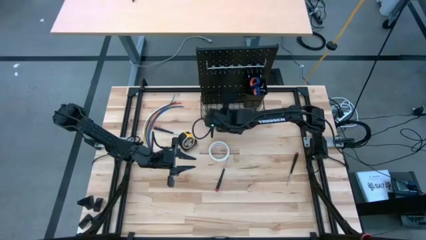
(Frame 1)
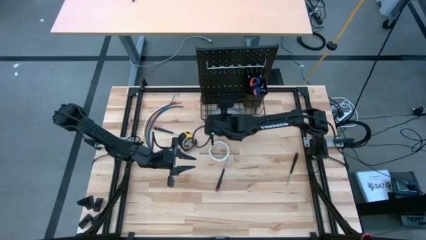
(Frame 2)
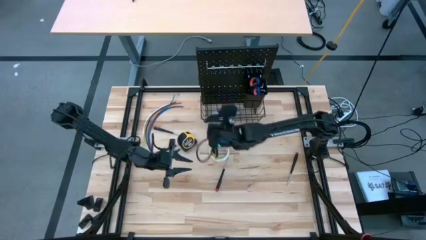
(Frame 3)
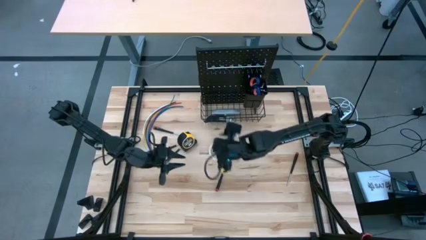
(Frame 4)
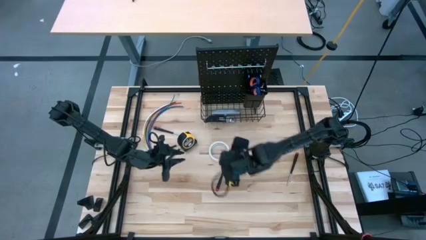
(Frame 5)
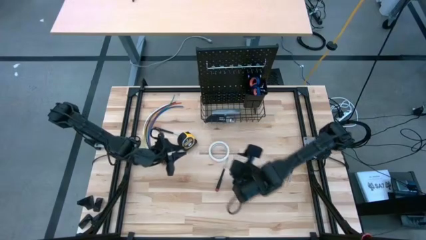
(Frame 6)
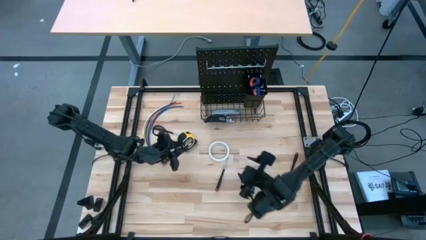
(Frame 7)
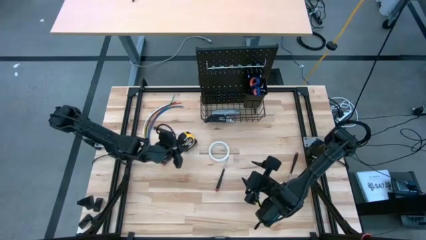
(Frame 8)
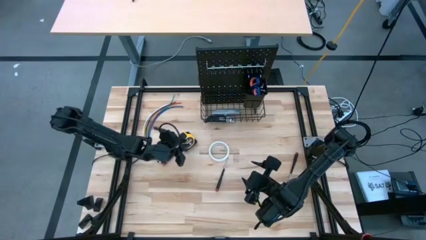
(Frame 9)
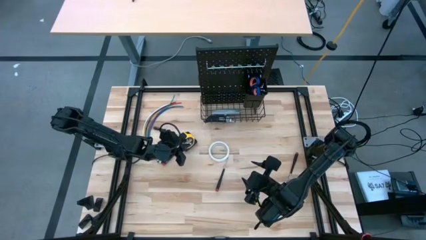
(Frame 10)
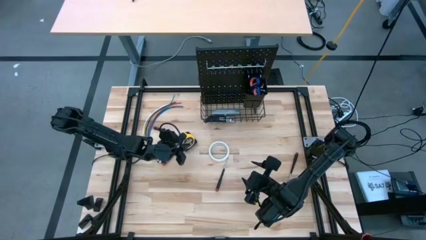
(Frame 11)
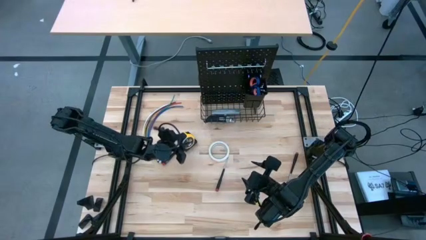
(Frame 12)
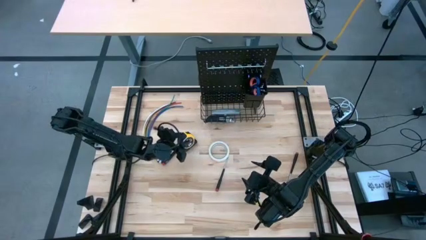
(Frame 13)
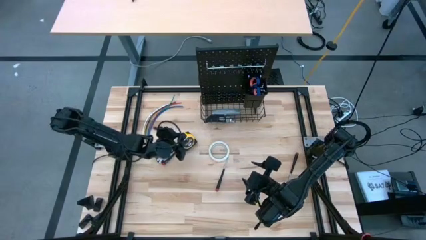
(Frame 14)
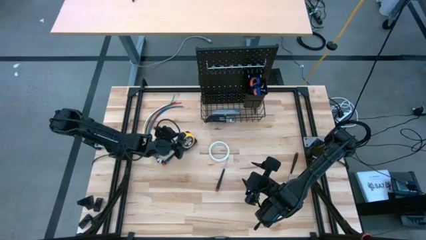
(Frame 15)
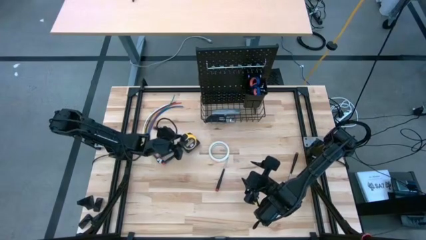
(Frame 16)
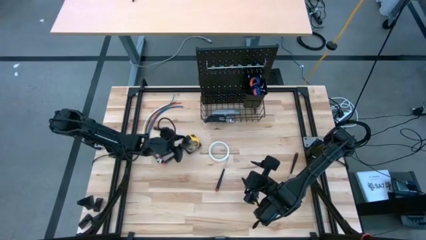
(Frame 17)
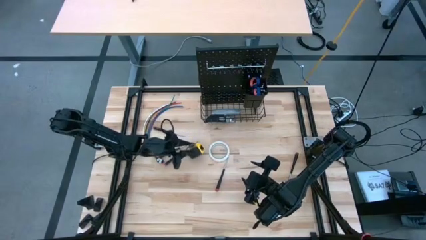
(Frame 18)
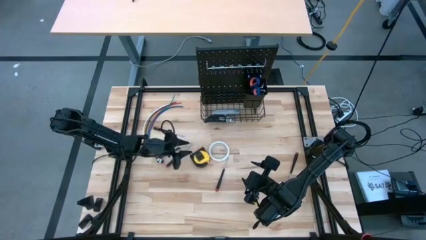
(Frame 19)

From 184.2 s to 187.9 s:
Task: Hang tools onto peg board
Hang the yellow tape measure on the pegboard

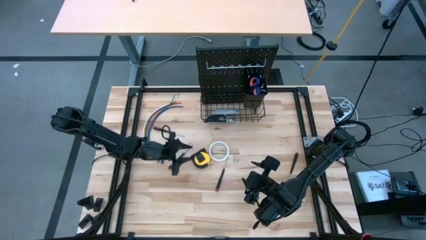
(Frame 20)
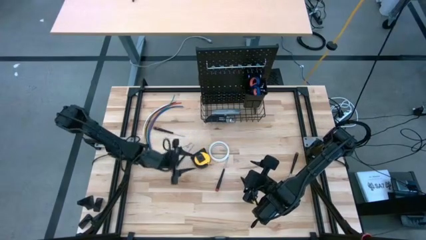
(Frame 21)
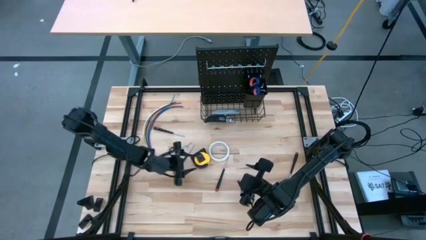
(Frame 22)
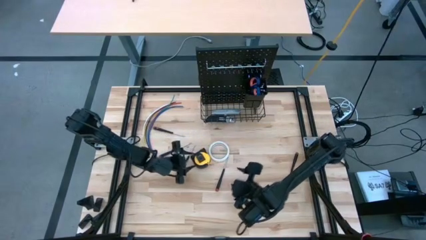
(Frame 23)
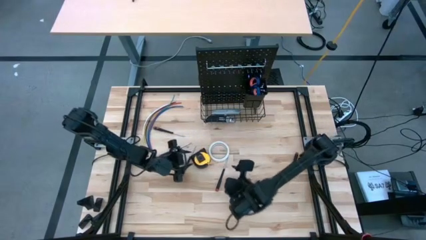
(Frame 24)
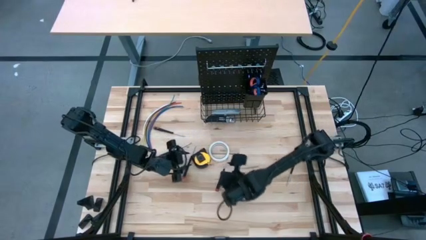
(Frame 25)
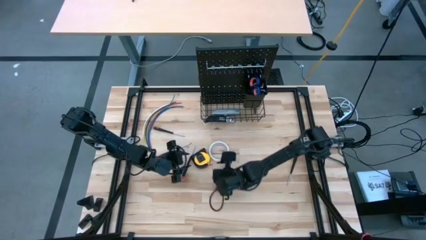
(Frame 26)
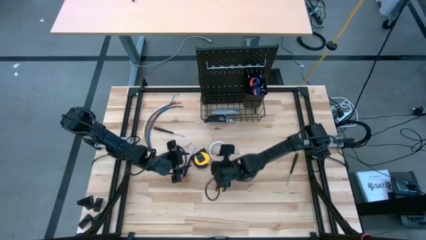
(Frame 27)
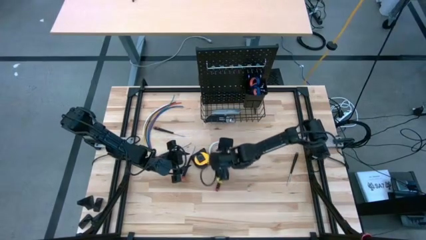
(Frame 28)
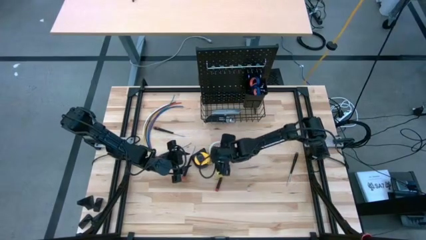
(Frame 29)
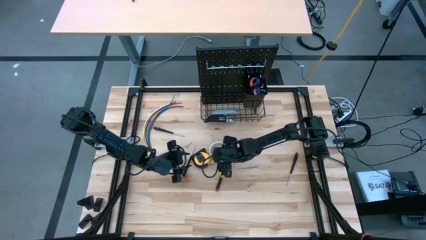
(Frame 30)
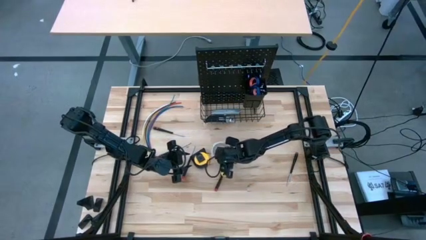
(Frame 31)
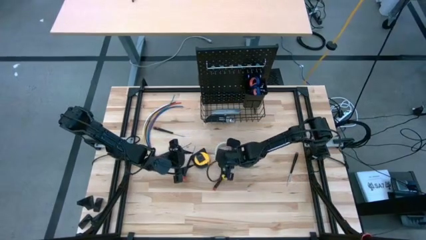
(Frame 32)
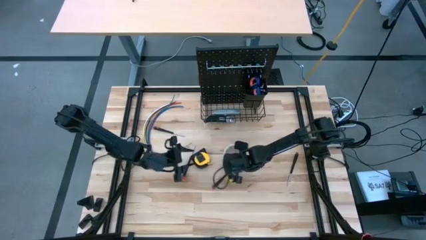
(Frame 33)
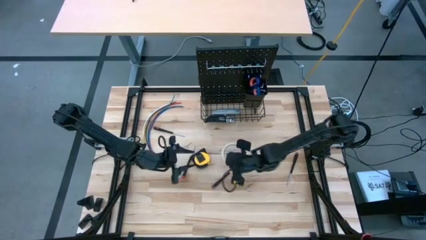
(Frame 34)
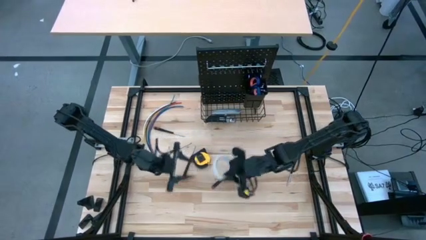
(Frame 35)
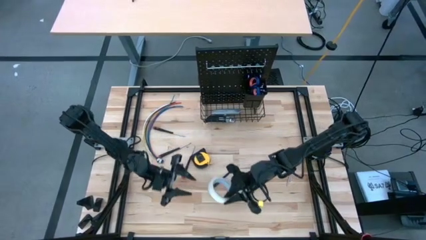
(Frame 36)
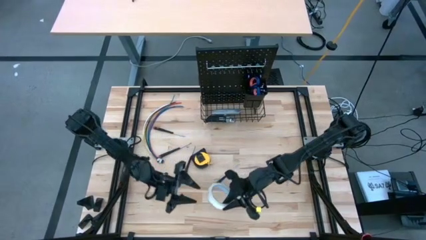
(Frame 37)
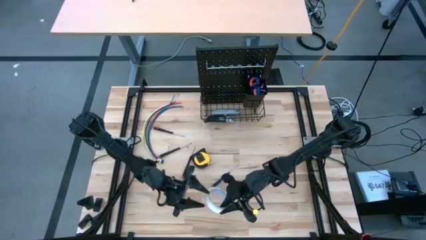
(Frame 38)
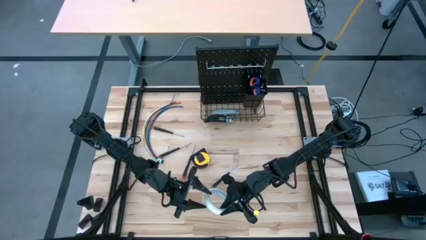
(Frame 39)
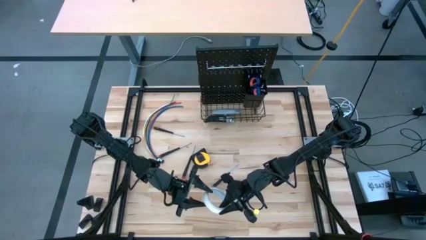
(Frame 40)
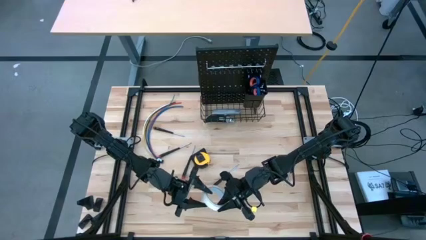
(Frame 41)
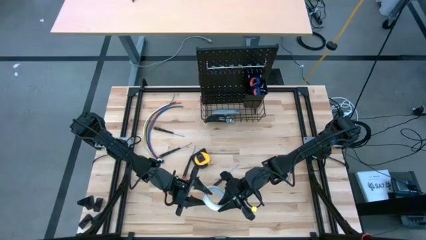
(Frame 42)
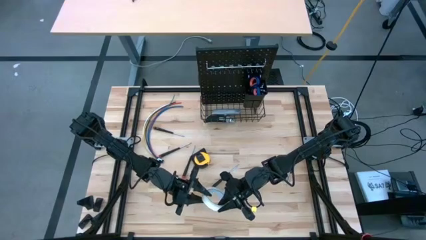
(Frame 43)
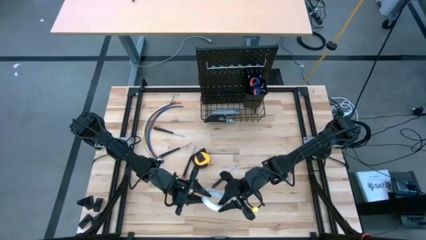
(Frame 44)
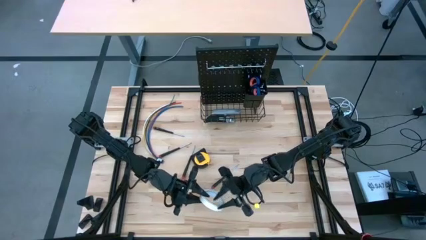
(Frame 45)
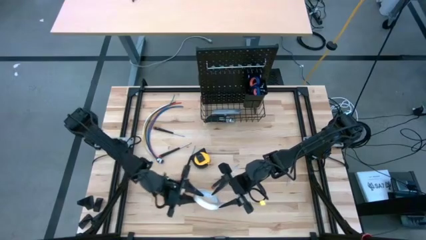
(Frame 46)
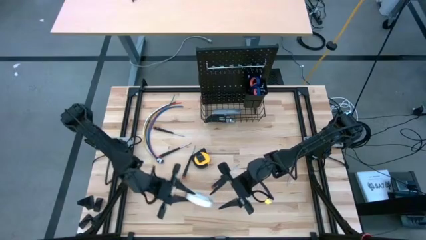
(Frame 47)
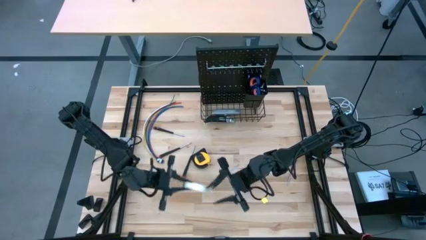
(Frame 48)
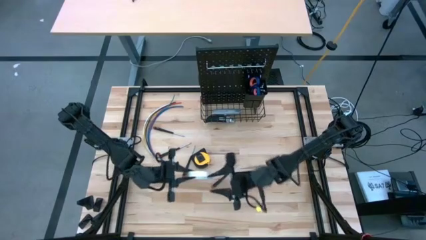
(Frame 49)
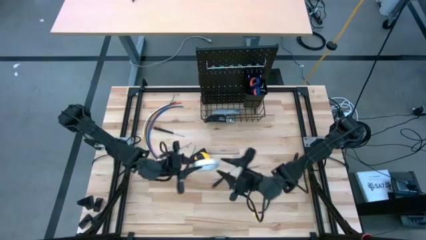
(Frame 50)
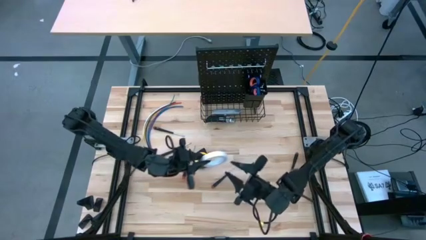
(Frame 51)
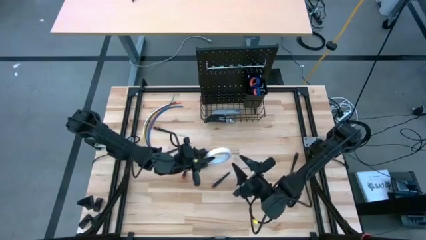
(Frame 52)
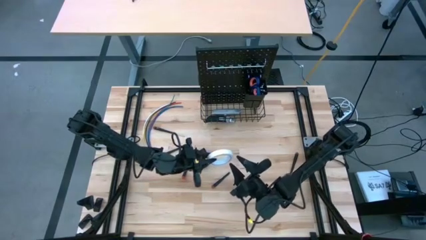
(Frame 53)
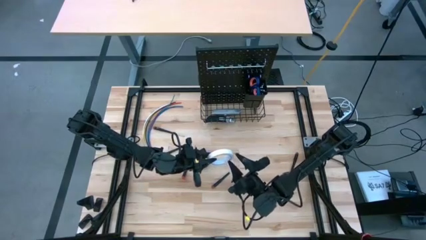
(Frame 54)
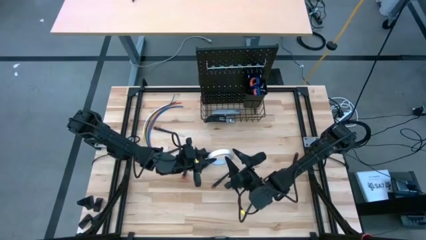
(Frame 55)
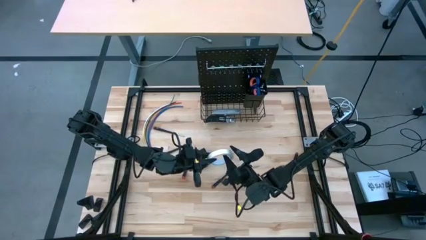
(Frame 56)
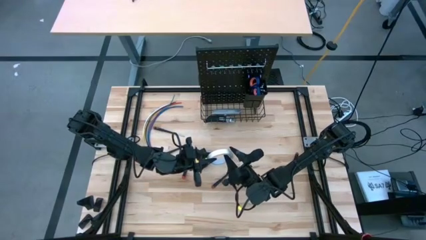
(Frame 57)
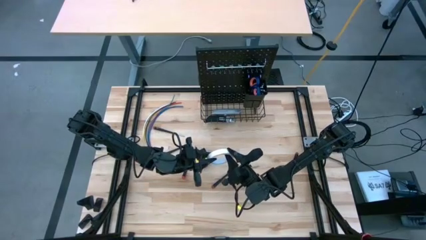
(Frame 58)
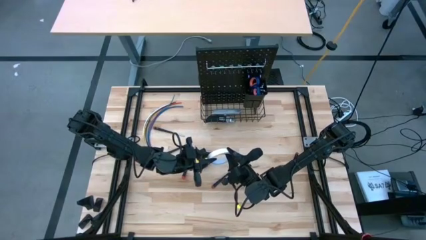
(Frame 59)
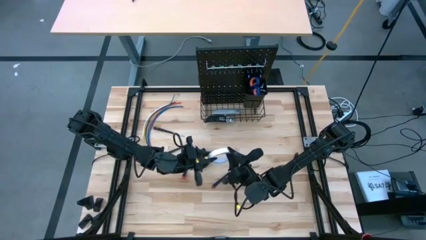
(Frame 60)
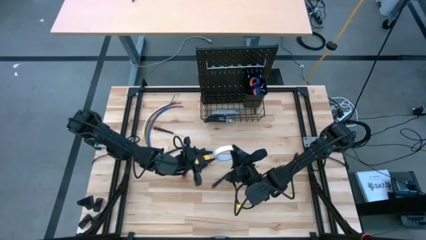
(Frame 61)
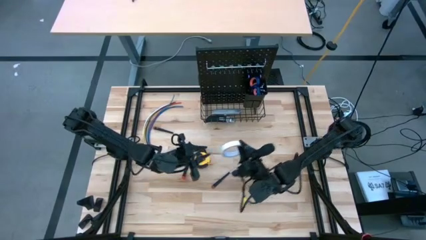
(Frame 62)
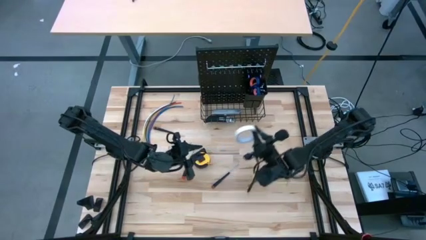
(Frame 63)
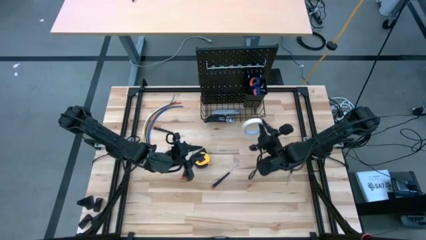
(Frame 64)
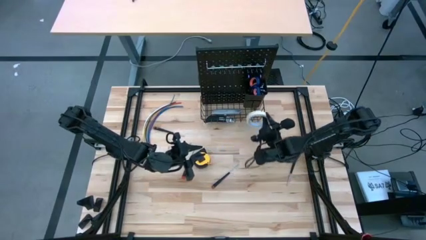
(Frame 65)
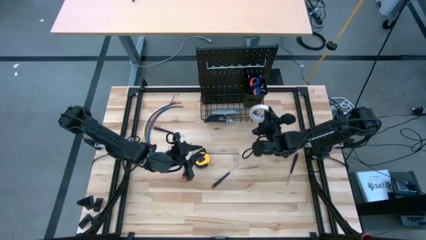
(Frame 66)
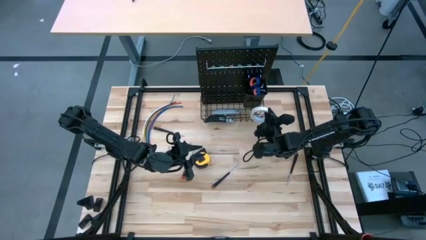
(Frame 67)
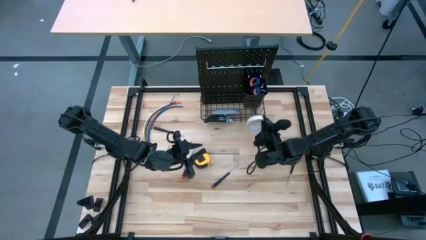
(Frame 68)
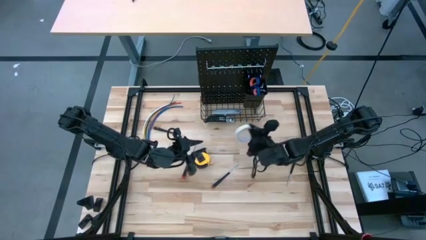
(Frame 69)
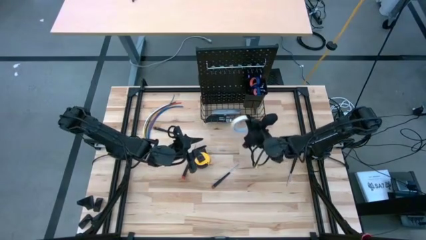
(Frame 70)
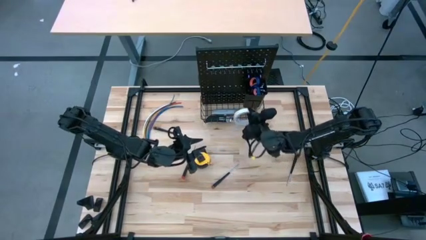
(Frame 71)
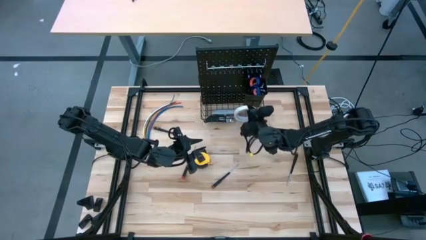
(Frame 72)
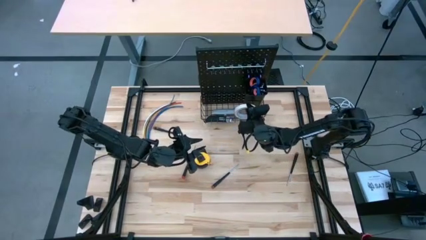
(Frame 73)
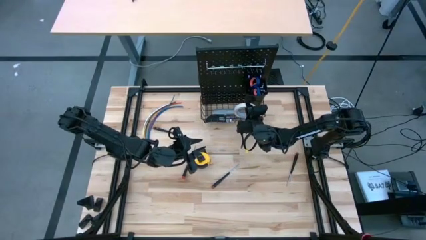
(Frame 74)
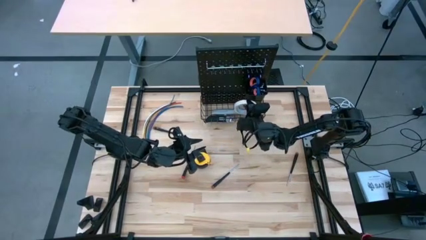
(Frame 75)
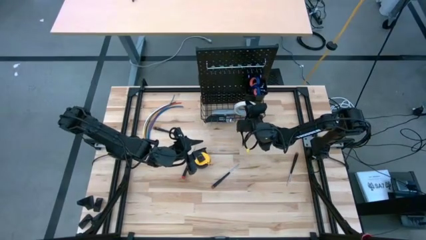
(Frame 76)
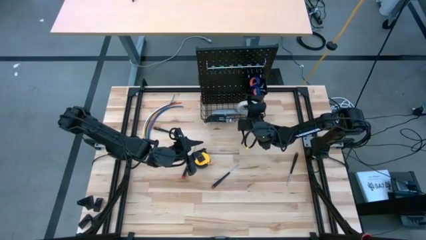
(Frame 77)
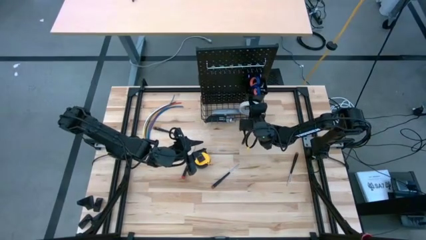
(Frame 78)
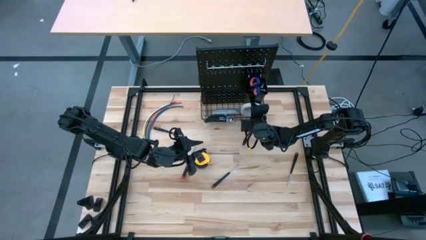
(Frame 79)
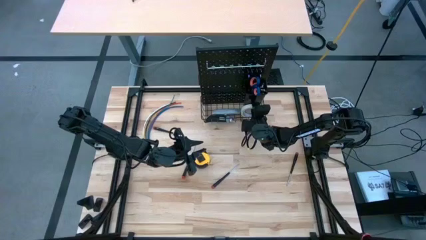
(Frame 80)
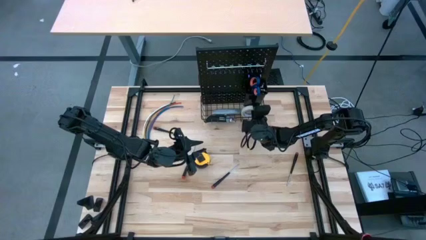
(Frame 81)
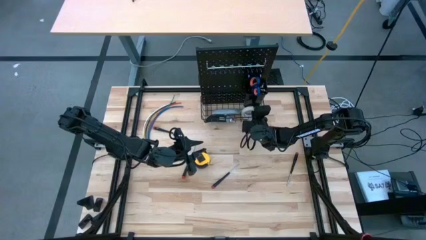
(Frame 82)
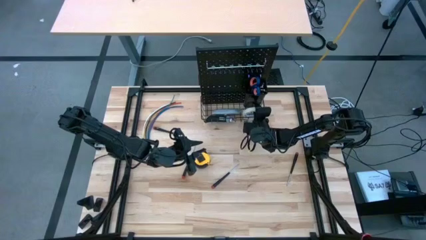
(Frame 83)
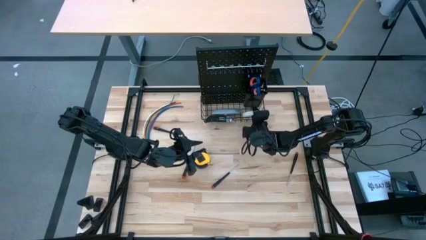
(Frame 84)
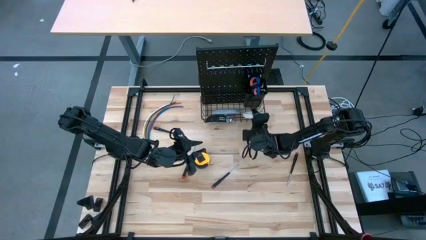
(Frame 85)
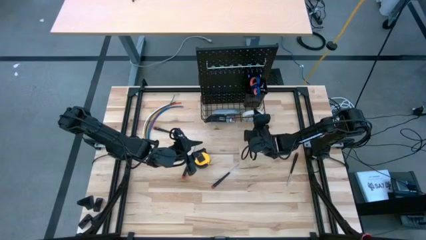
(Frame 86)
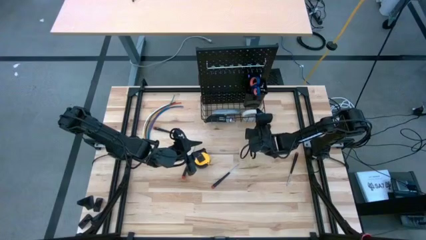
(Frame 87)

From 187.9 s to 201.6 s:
Put the white masking tape into the black wire basket on the peg board
